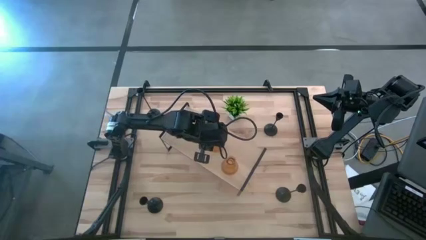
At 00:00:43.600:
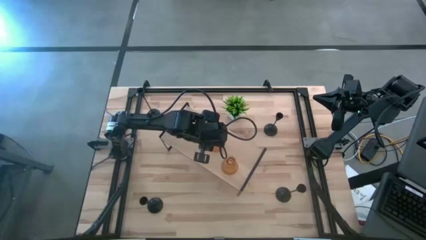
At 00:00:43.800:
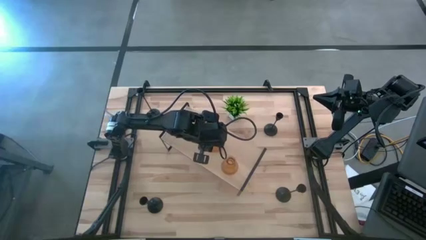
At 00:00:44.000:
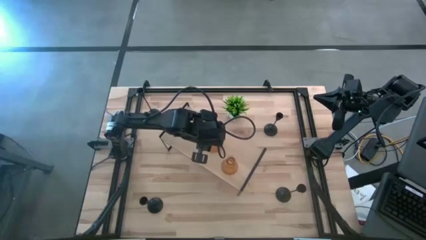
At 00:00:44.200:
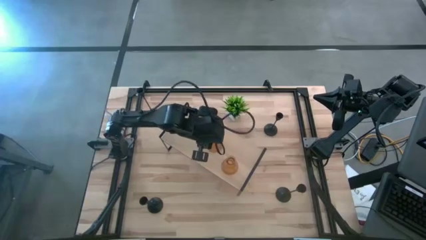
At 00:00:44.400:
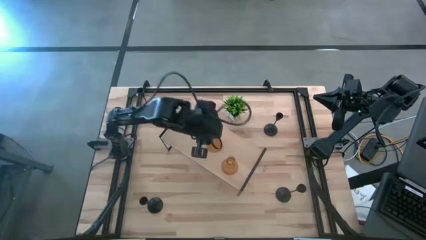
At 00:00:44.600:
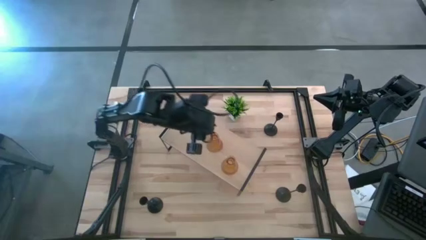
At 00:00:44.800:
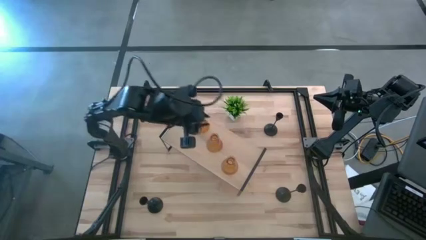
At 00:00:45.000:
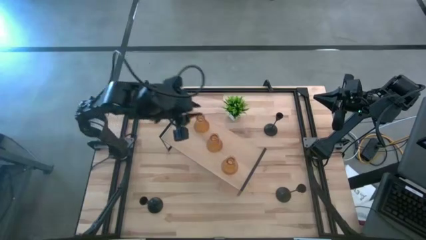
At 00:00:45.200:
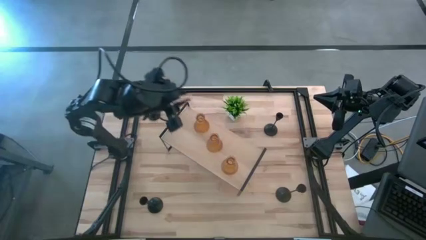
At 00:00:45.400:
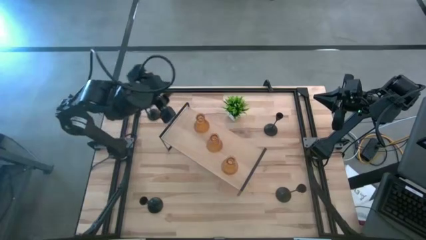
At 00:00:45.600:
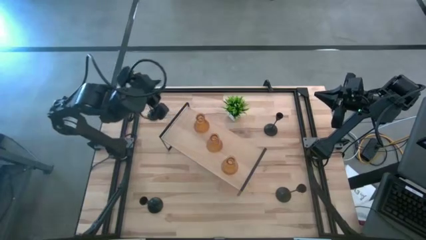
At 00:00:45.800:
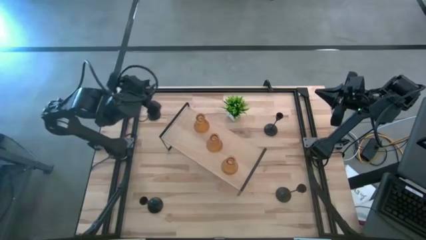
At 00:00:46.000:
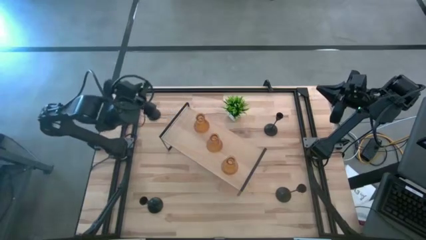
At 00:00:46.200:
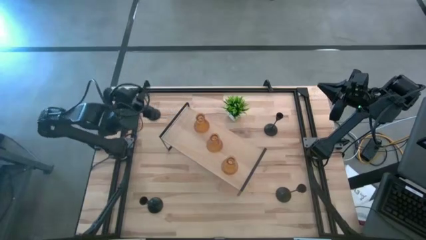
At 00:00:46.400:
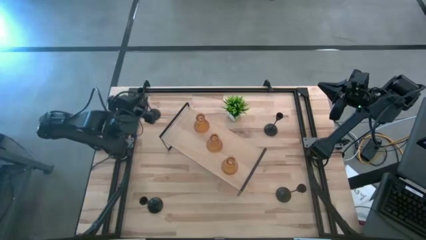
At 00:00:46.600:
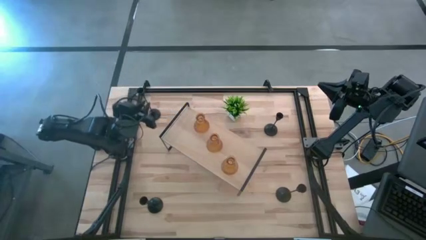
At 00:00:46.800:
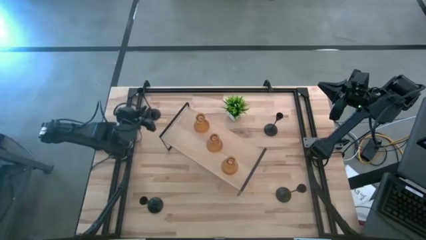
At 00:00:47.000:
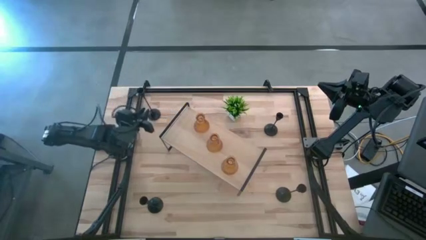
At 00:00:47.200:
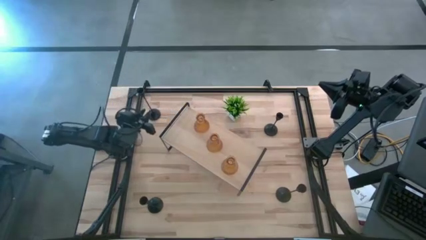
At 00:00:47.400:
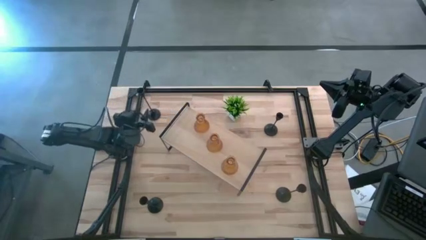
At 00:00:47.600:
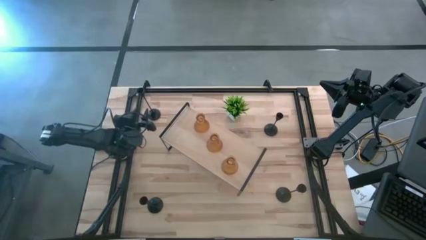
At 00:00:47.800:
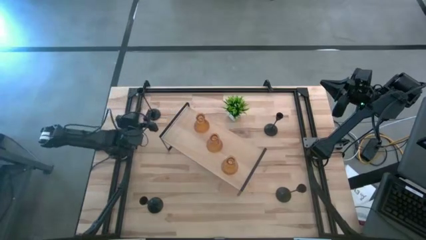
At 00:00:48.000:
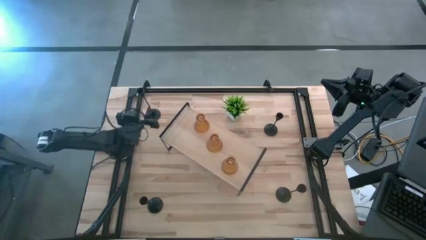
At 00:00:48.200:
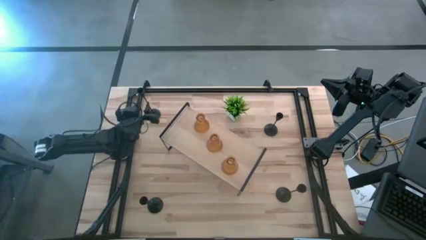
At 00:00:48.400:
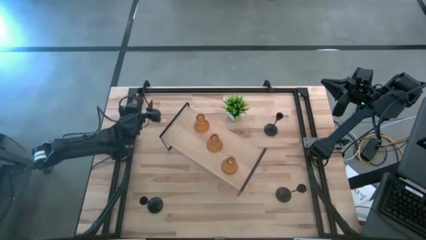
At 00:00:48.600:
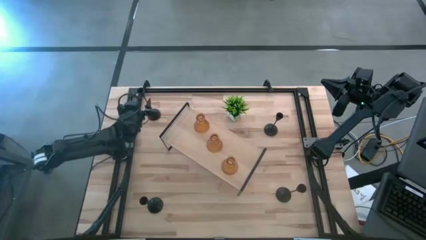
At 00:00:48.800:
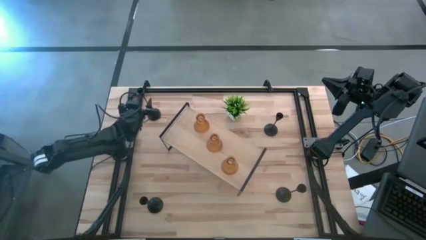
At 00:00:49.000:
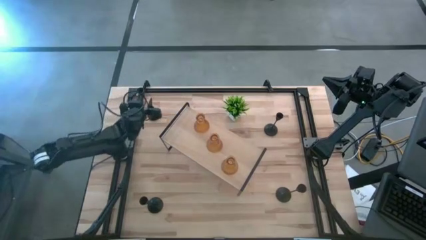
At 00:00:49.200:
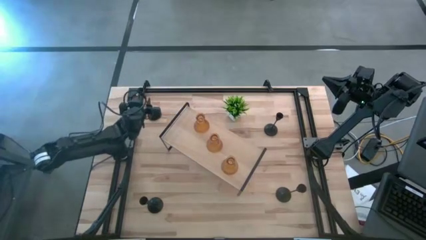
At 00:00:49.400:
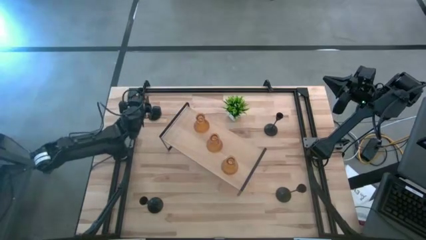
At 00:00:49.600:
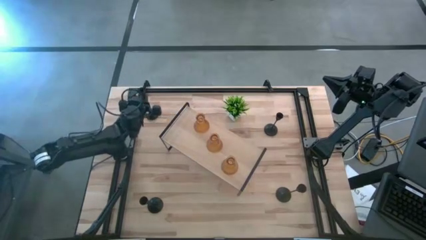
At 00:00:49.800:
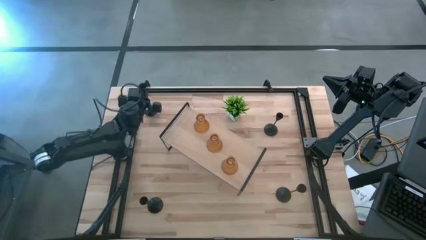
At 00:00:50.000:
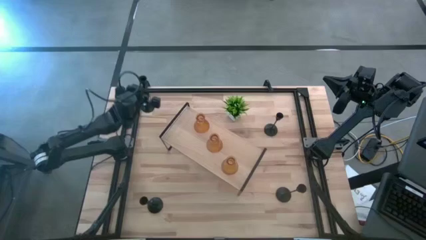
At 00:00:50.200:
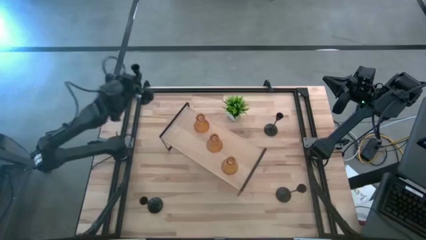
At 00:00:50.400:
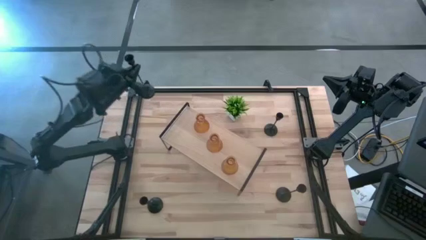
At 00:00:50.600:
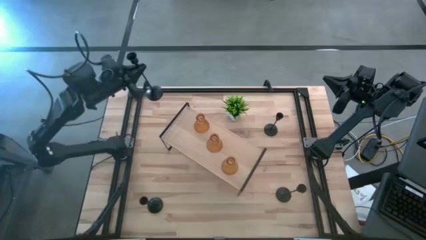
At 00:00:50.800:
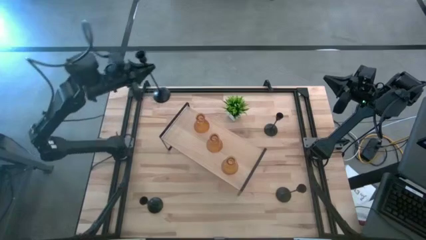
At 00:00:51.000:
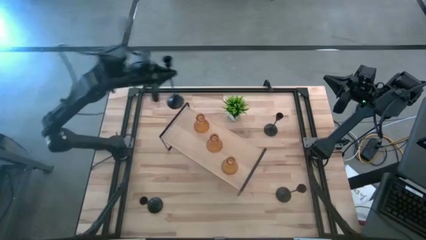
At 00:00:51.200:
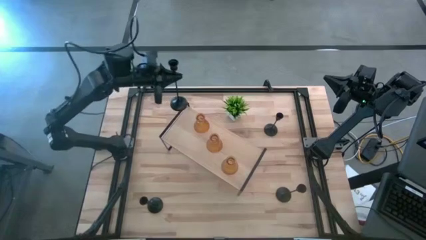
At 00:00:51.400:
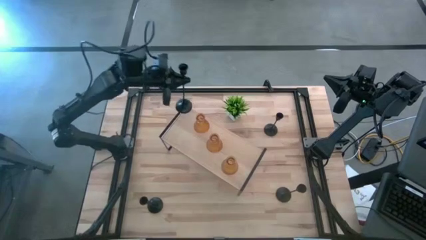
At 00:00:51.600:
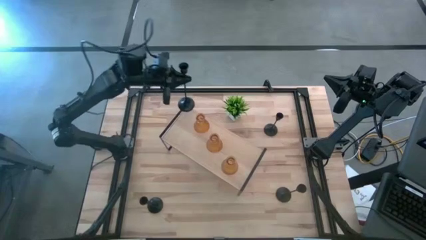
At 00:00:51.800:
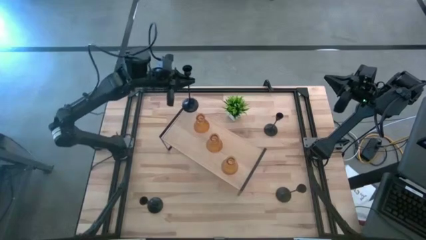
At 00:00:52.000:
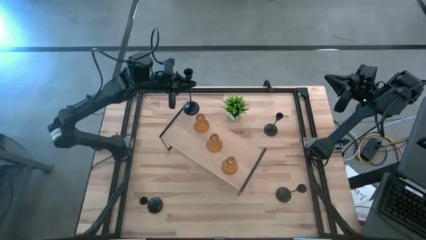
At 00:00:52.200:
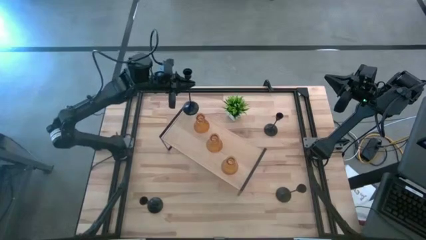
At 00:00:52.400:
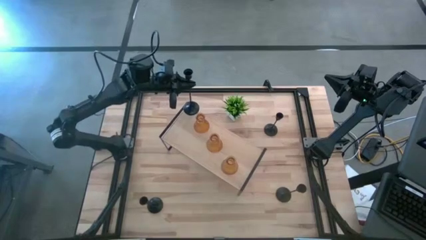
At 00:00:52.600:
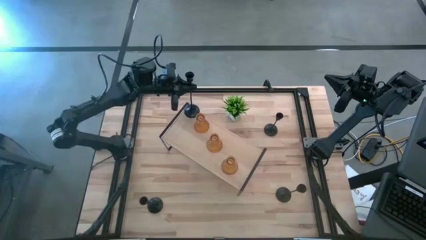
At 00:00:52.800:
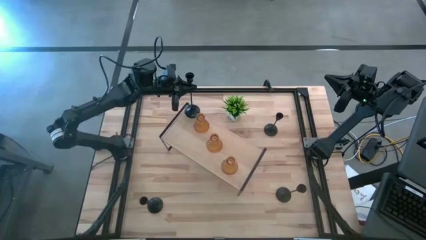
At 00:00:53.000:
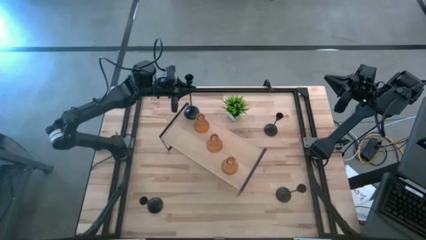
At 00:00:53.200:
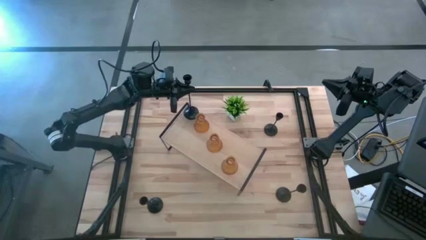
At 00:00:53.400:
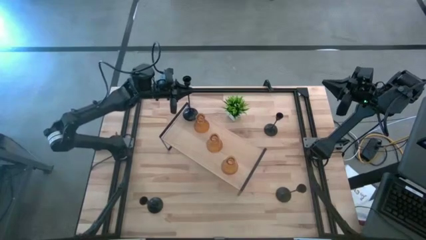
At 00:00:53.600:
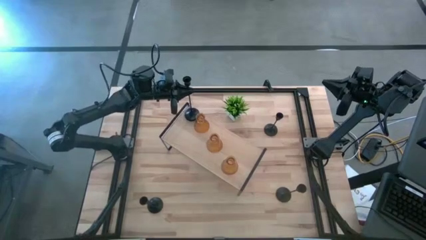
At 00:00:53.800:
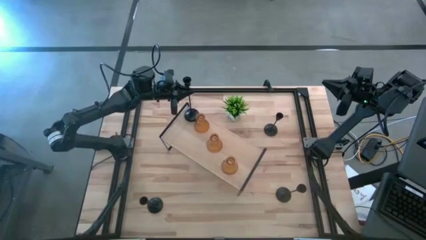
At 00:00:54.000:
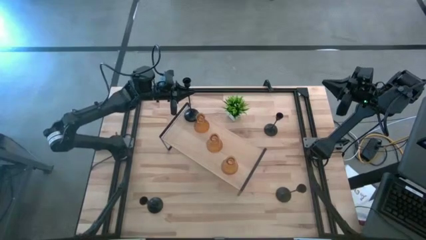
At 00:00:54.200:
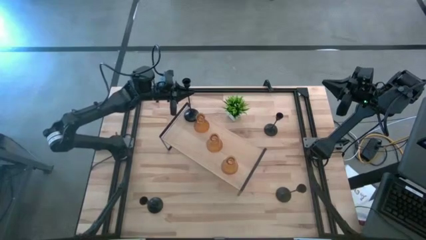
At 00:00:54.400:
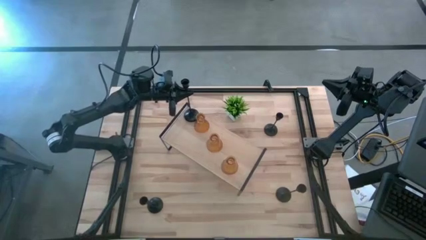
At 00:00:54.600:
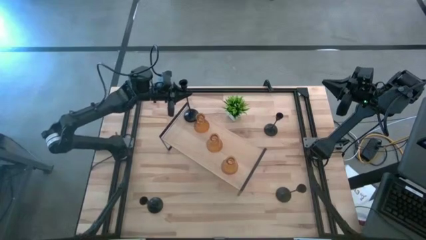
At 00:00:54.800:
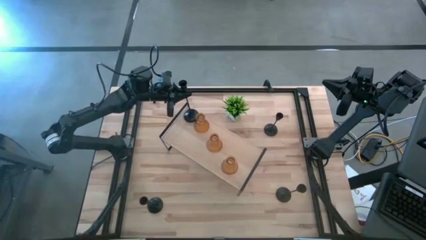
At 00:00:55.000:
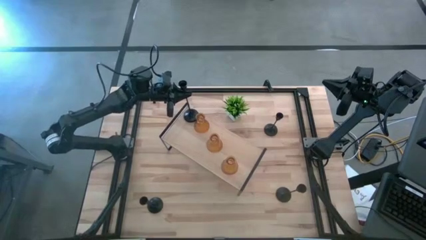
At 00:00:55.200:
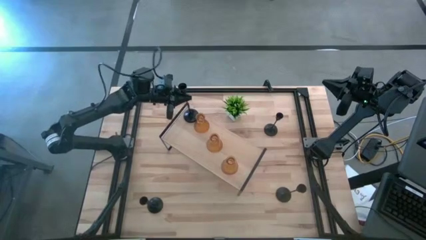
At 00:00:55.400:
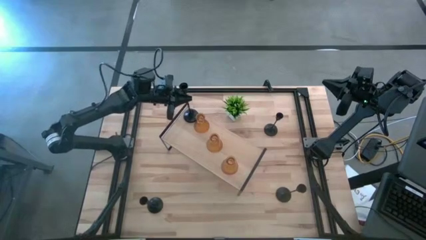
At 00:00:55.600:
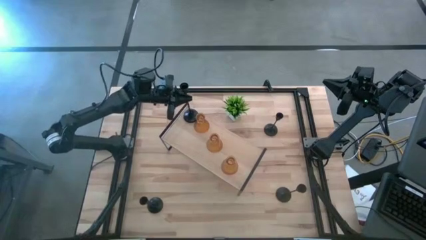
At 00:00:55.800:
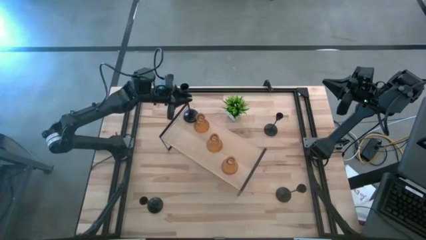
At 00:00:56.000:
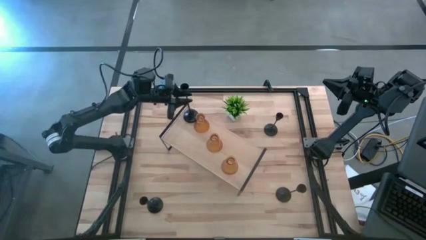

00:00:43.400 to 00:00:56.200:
Task: Pick & Place candle stick holders
Put the black candle holder on the shelf
